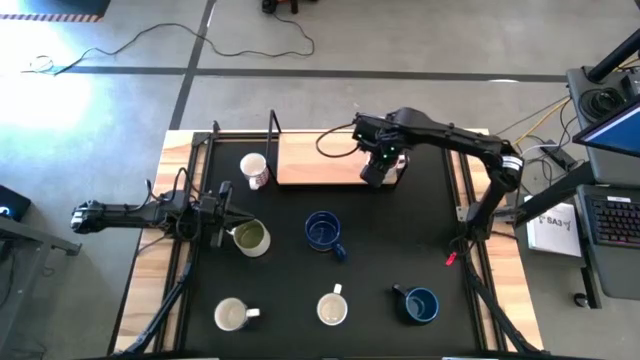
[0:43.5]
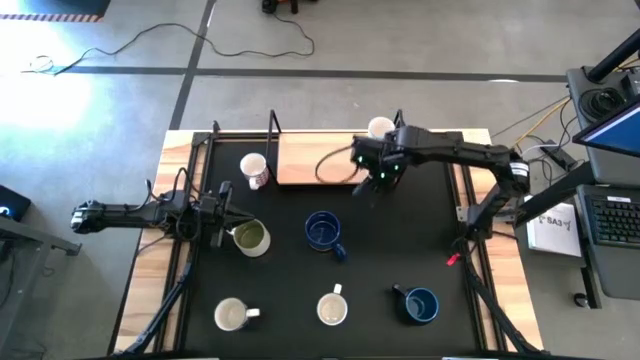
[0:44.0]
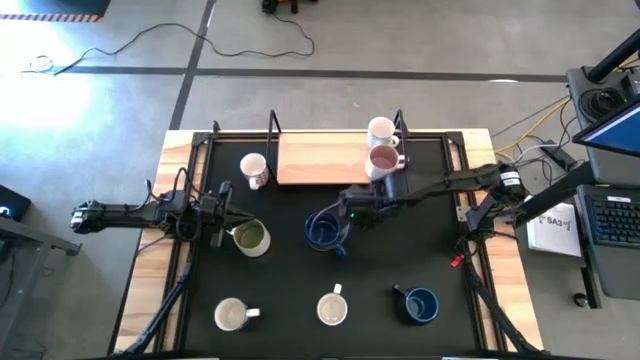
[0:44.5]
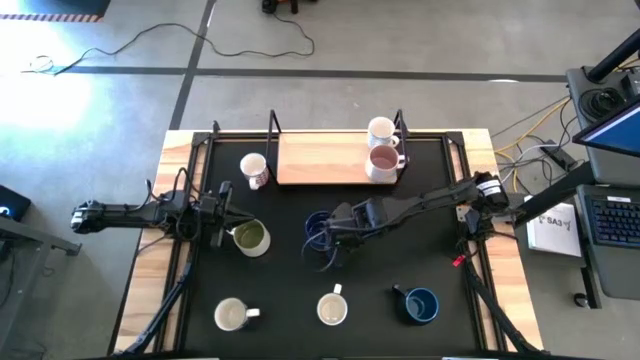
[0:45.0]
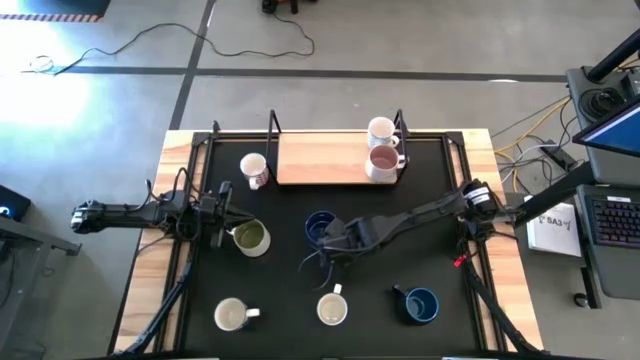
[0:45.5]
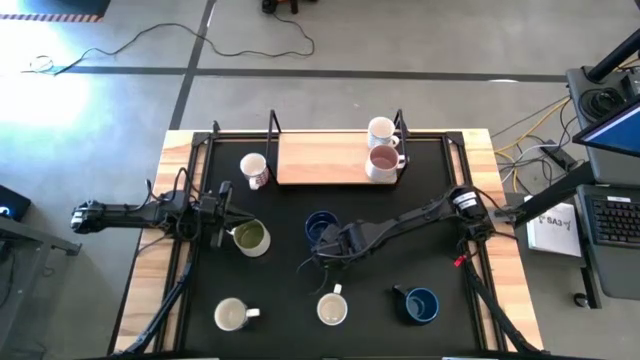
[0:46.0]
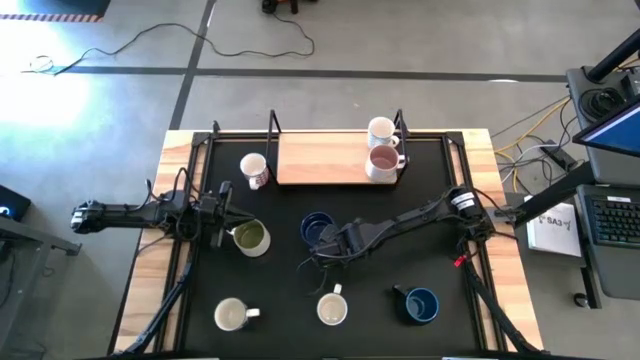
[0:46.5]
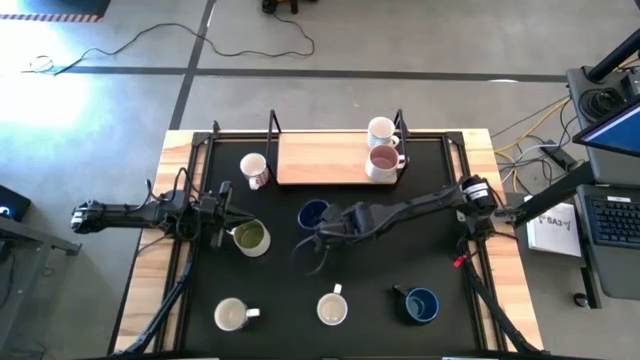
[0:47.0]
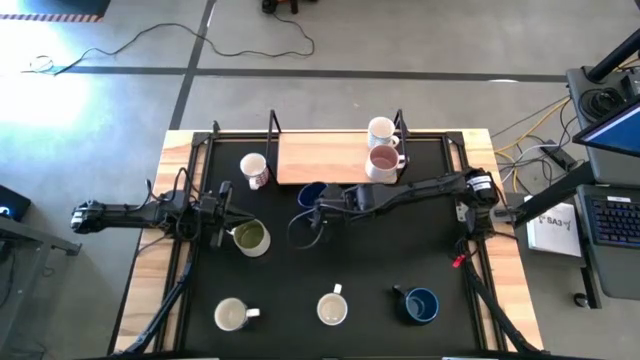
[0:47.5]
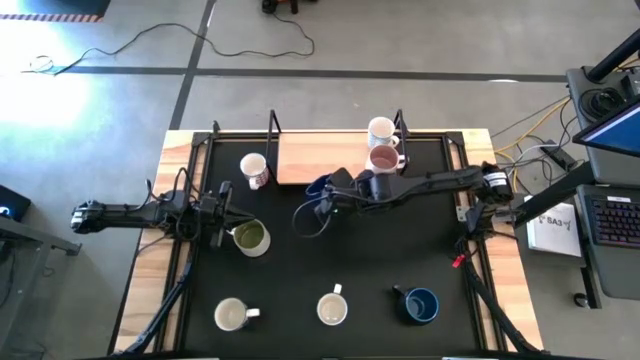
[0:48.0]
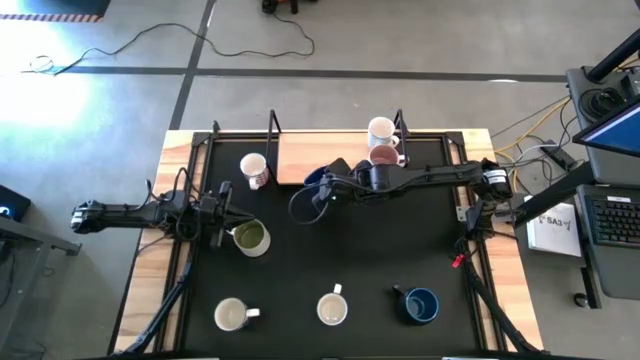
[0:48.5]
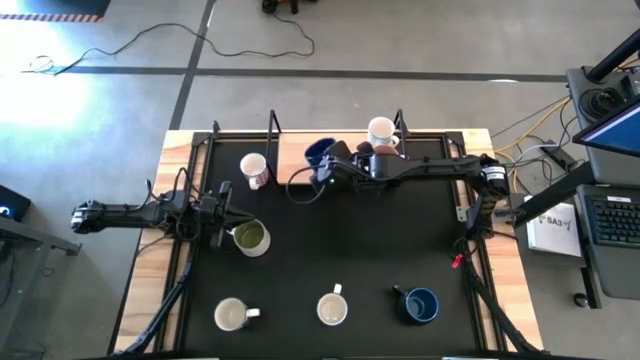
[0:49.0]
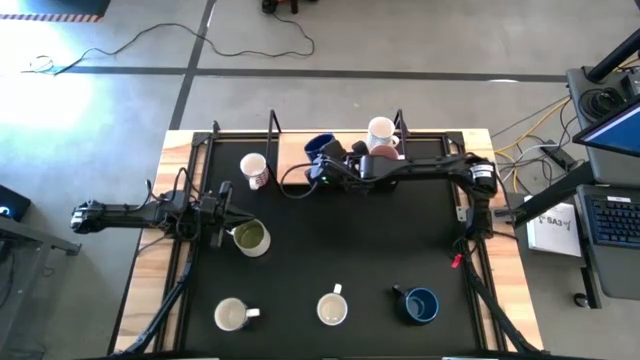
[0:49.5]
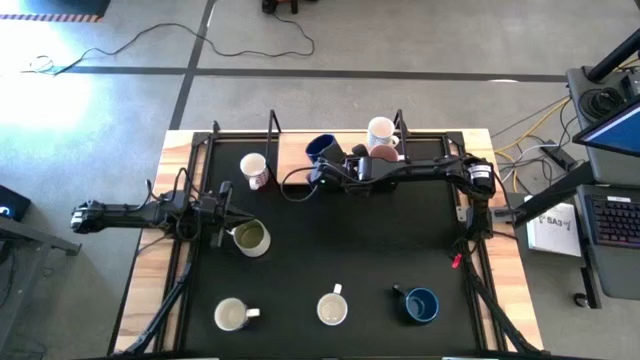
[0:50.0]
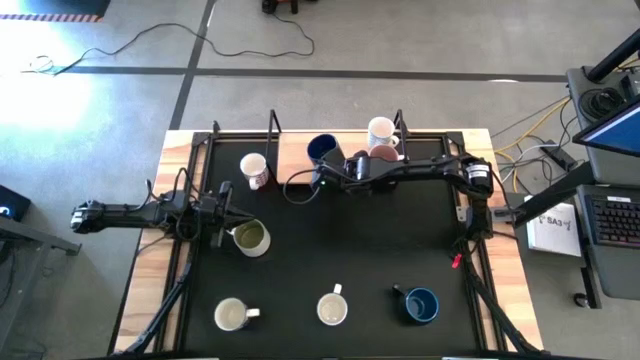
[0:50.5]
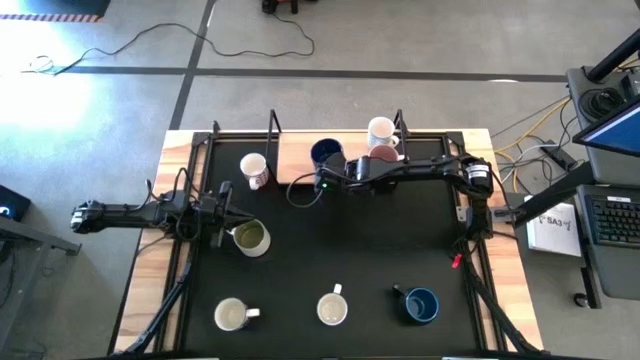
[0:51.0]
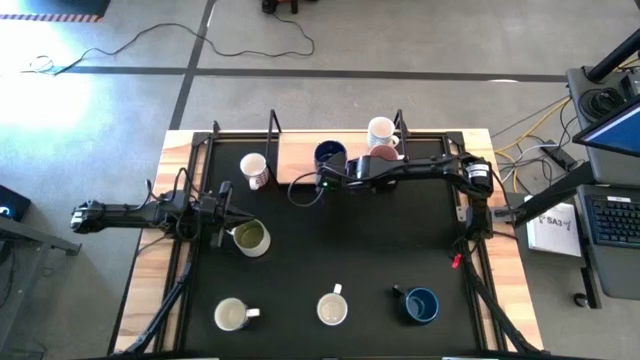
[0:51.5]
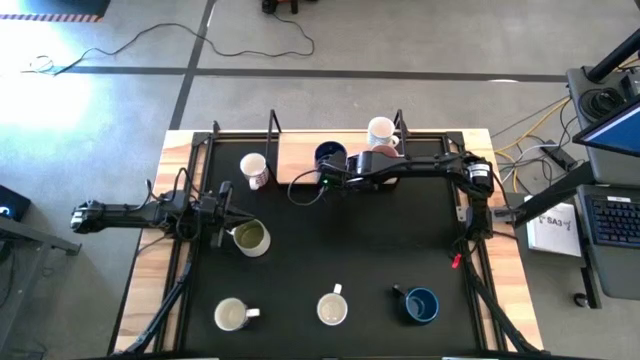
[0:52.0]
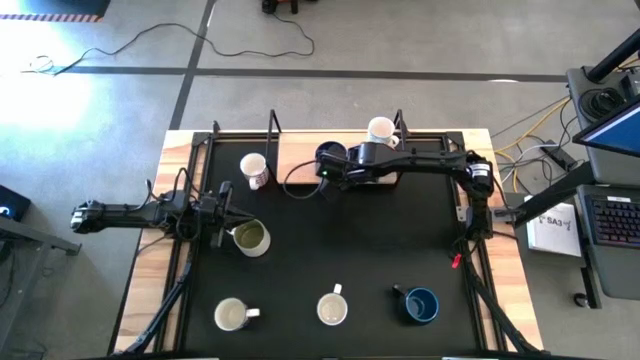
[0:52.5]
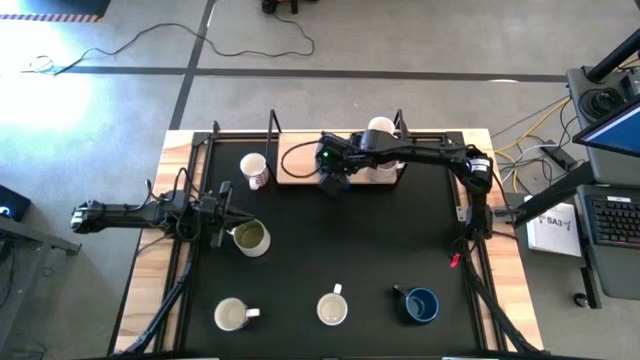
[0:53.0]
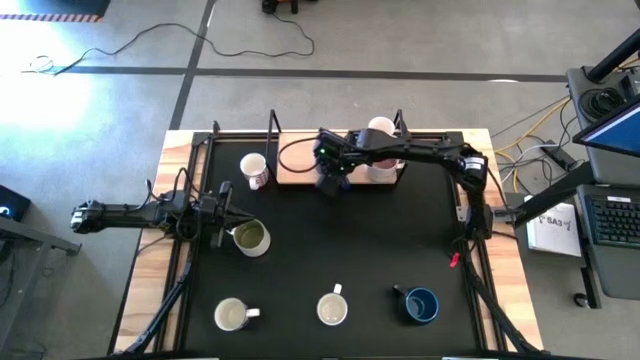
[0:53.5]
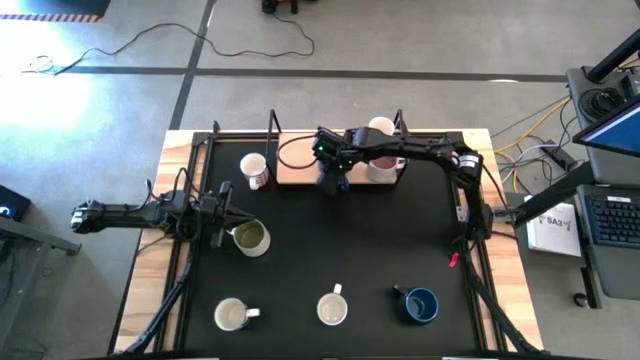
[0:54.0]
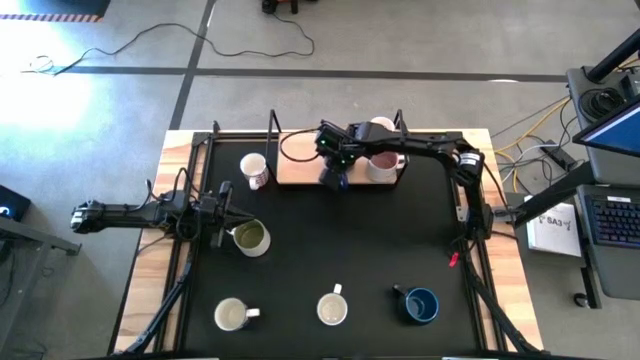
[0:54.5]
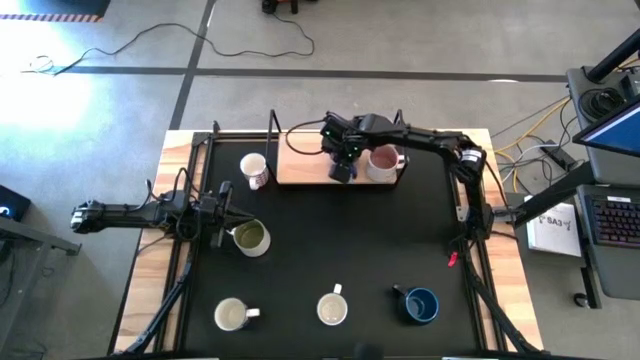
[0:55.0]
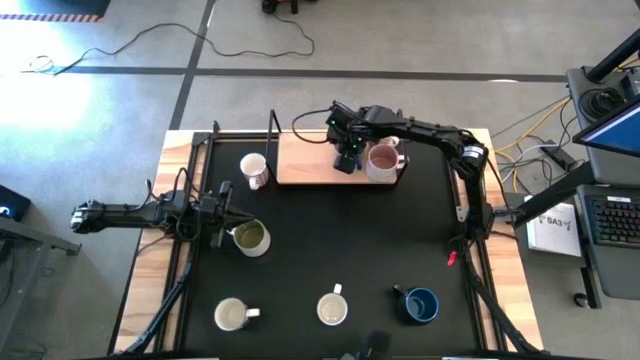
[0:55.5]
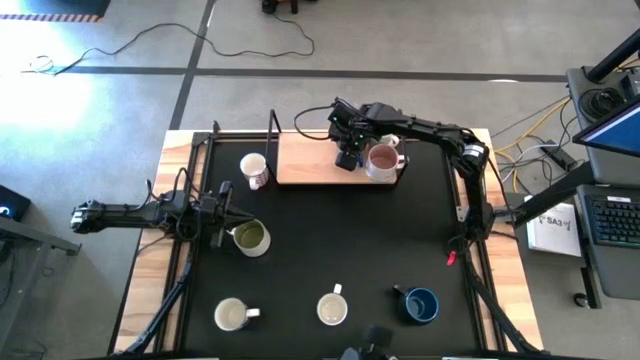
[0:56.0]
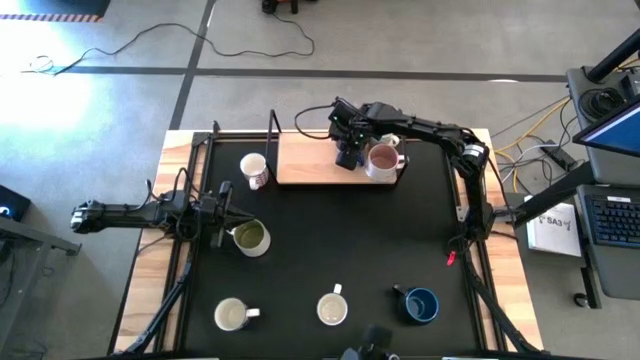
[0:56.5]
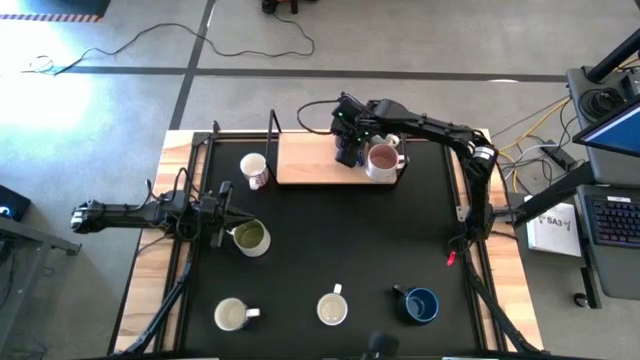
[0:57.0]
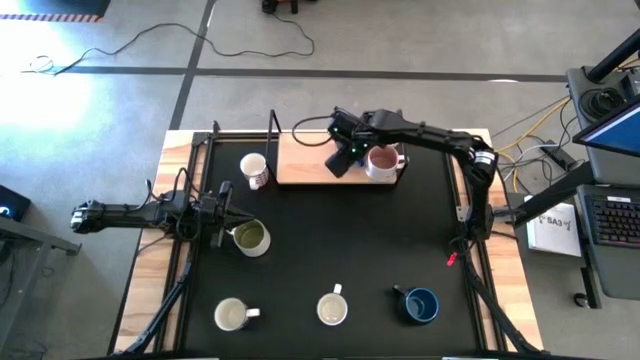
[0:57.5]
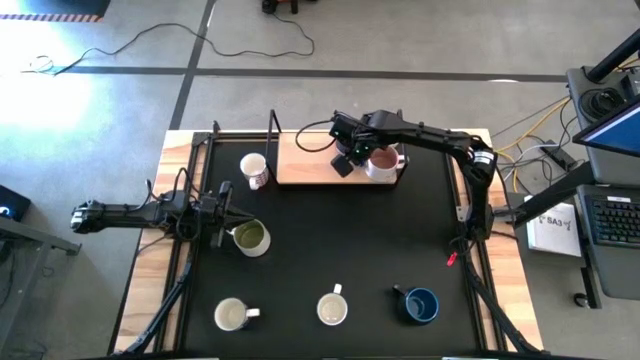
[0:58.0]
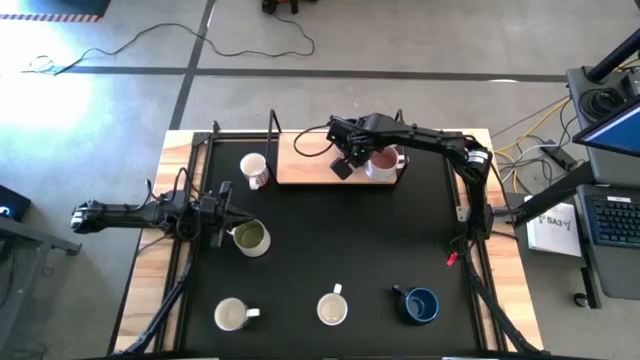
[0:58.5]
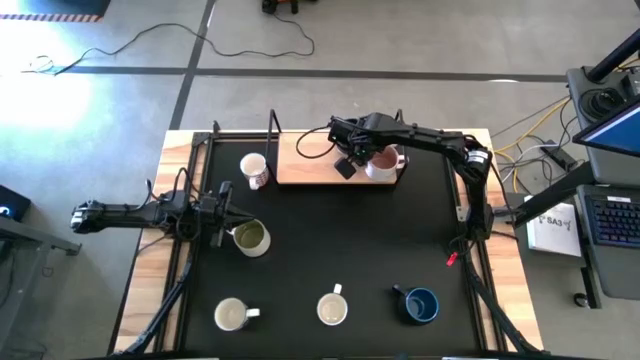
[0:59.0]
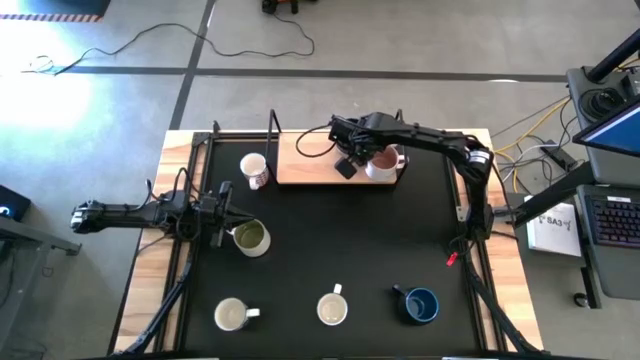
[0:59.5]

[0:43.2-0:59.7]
Task: Place coffee mugs
Put the dark blue mug on the shelf

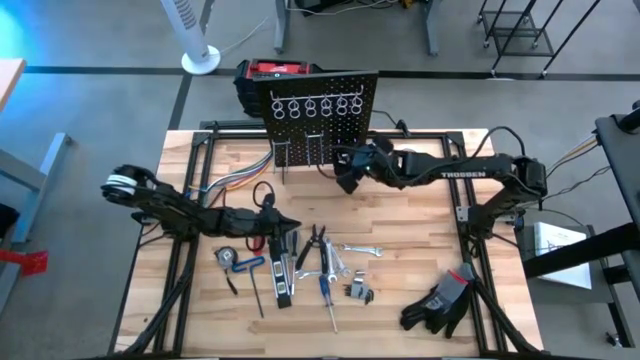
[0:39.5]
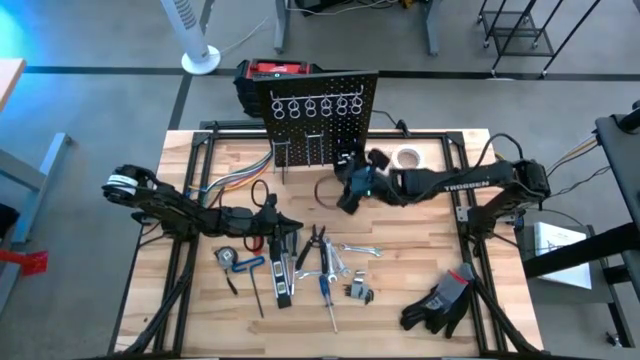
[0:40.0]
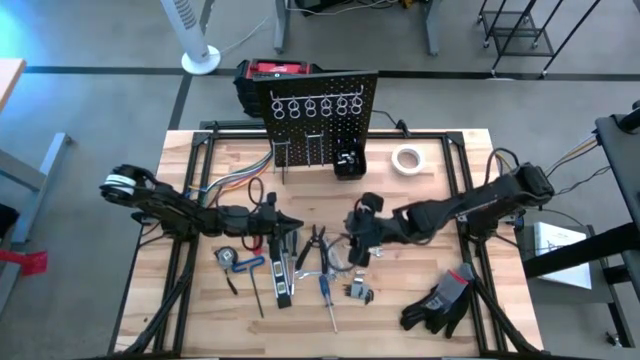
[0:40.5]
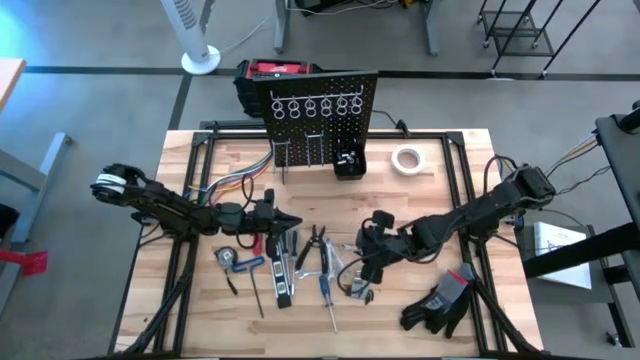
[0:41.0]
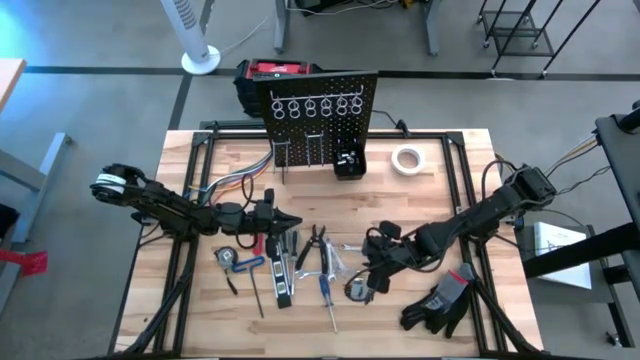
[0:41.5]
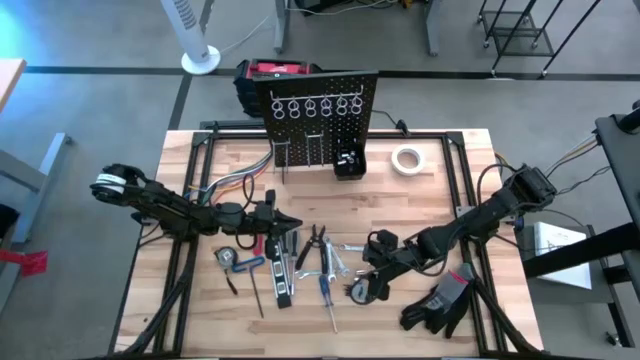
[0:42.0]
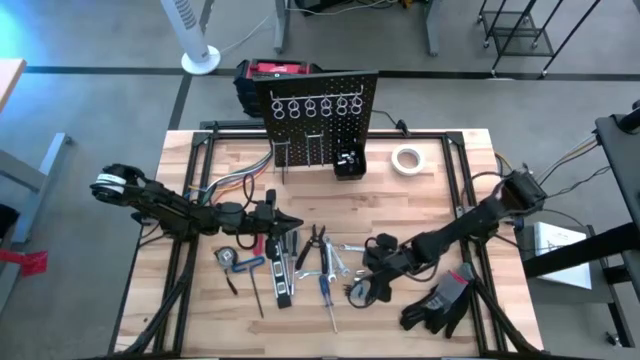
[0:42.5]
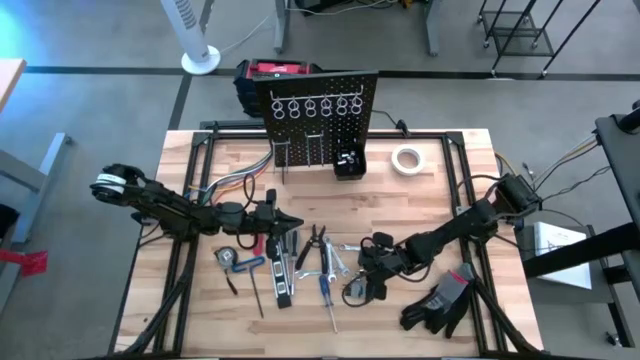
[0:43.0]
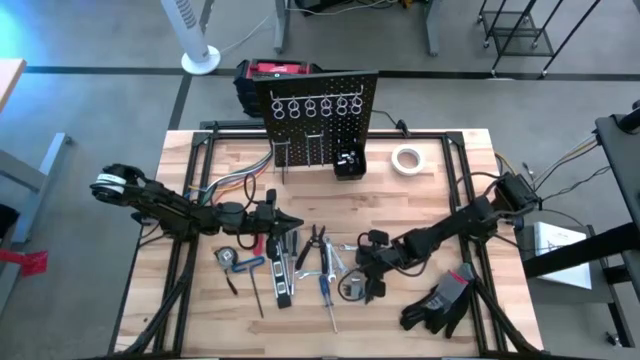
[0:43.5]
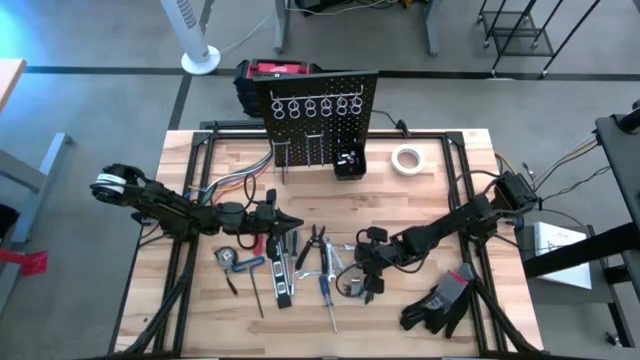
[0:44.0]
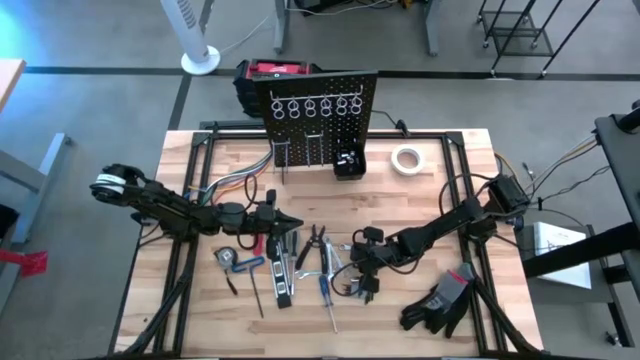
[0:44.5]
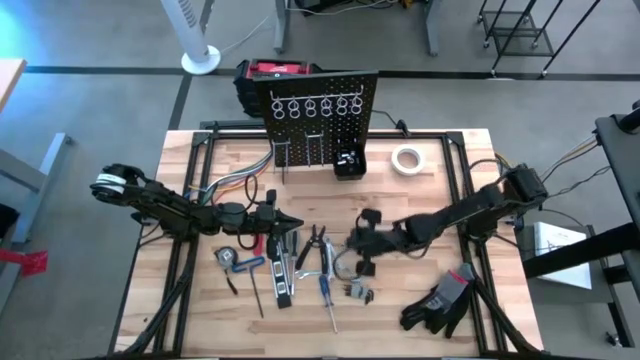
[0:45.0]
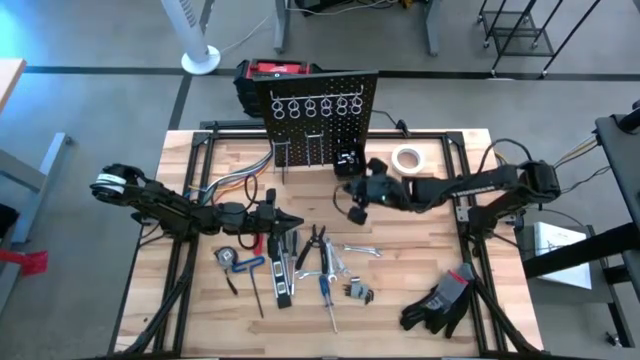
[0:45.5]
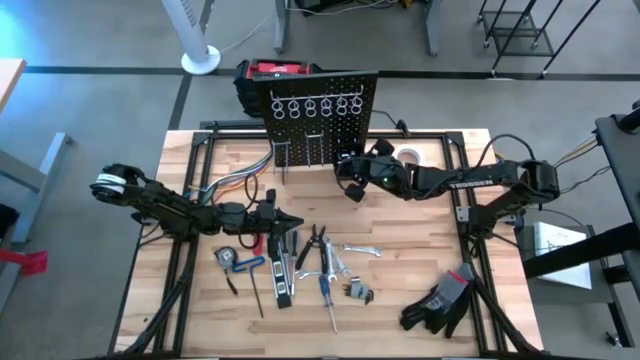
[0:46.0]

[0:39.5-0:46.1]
Task: Hang tools onto peg board
Put the socket into the black tool bin on the peg board
